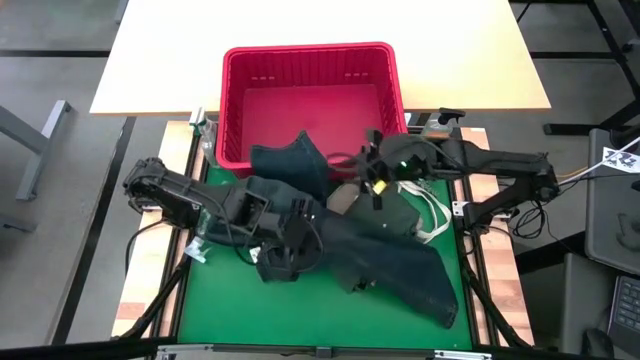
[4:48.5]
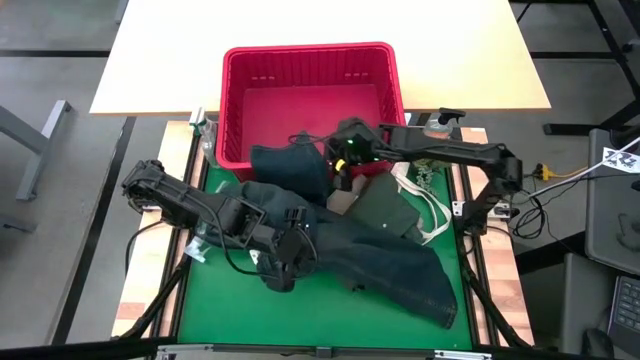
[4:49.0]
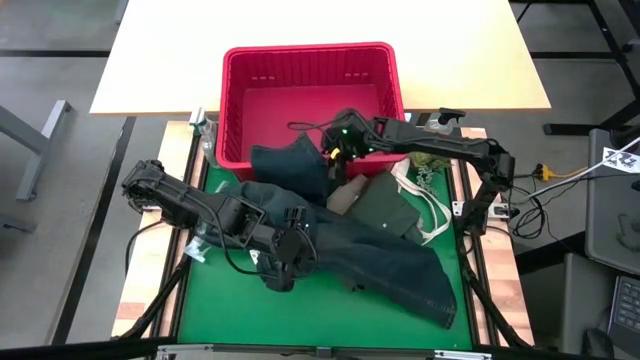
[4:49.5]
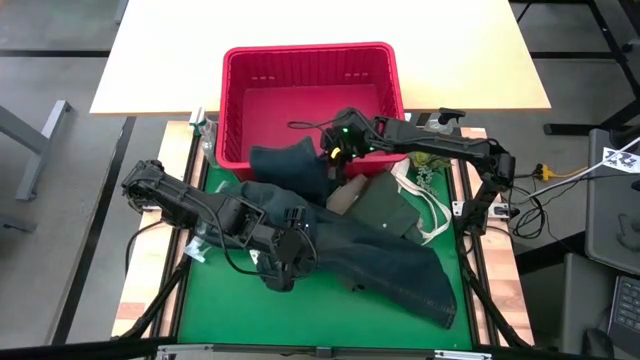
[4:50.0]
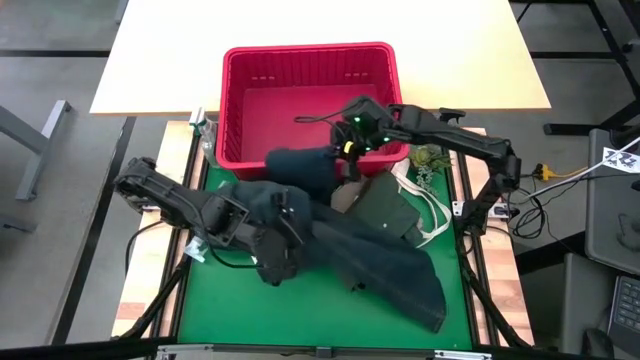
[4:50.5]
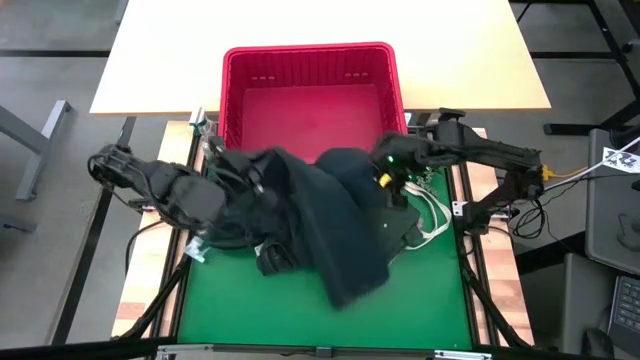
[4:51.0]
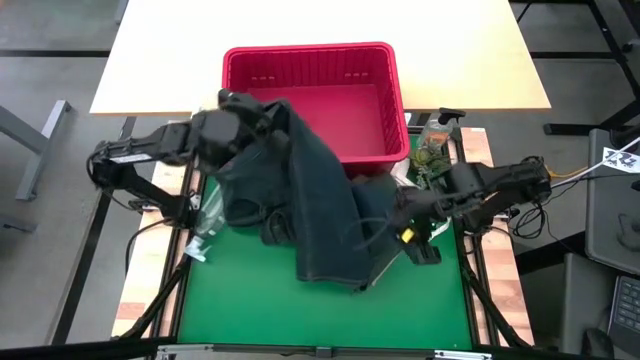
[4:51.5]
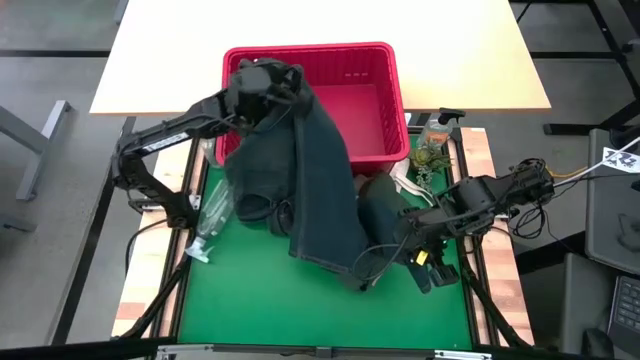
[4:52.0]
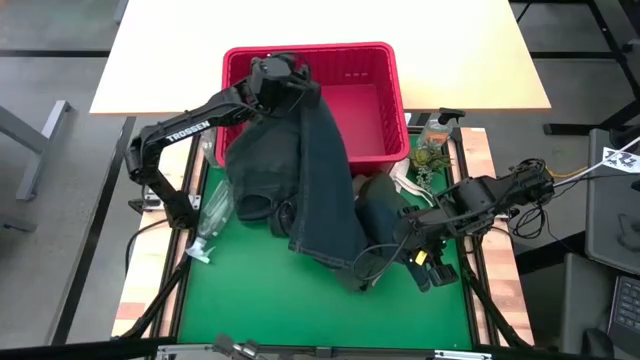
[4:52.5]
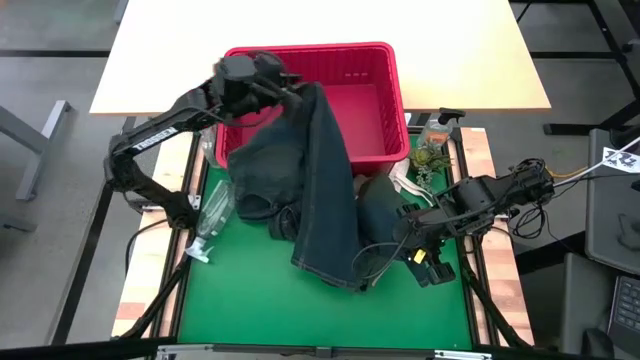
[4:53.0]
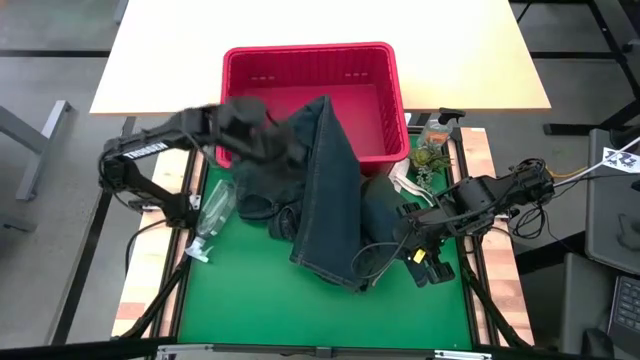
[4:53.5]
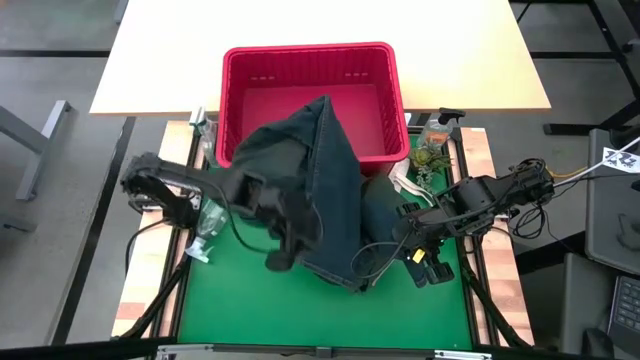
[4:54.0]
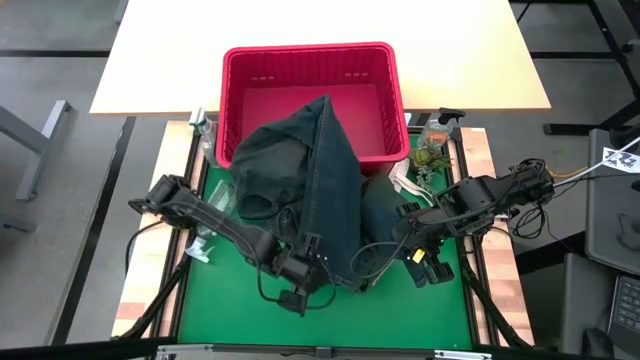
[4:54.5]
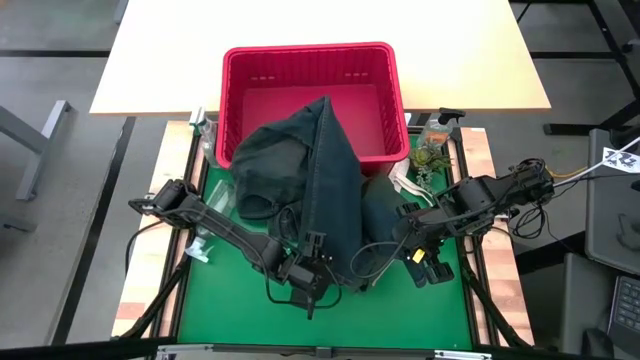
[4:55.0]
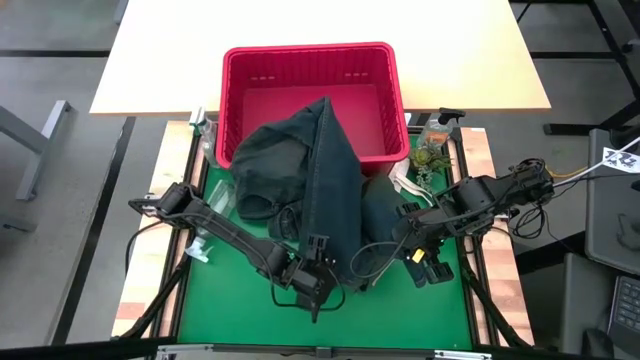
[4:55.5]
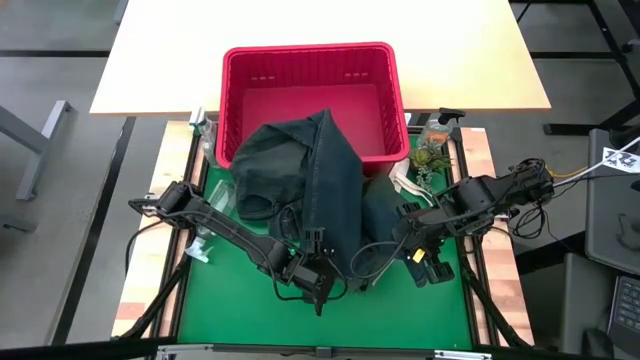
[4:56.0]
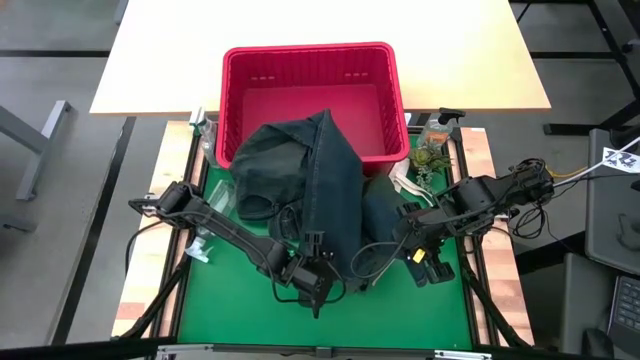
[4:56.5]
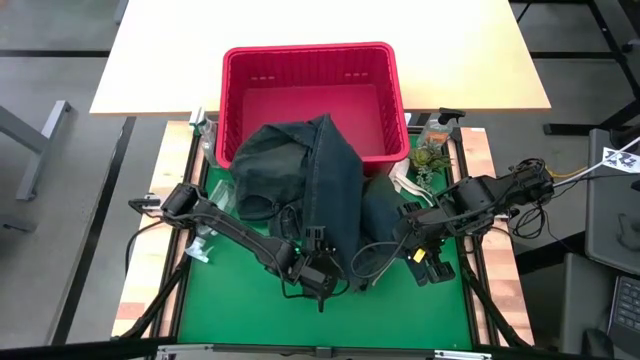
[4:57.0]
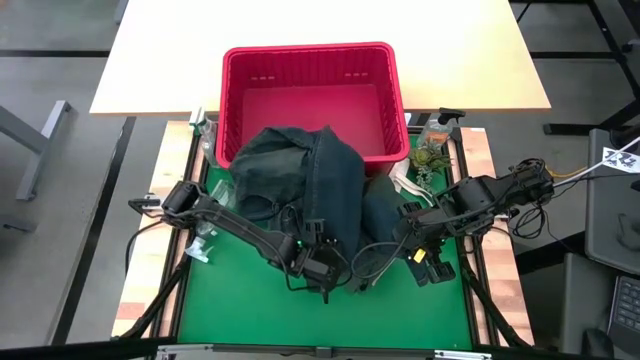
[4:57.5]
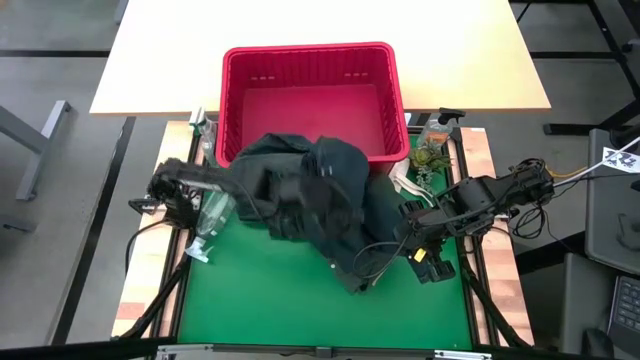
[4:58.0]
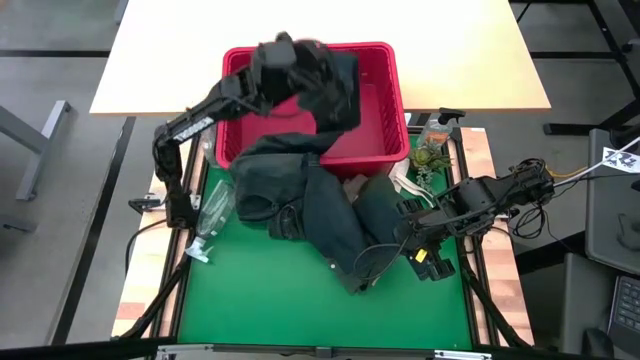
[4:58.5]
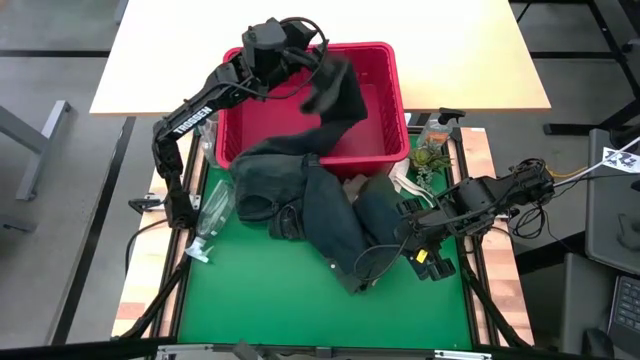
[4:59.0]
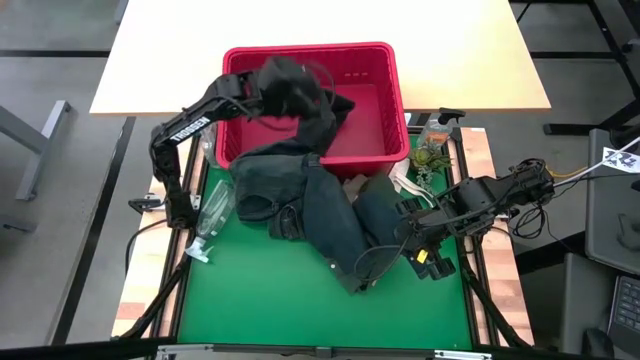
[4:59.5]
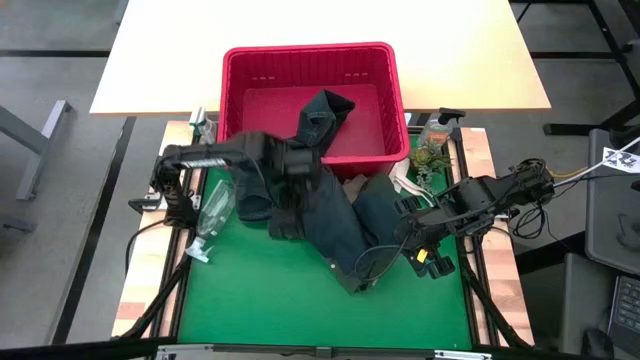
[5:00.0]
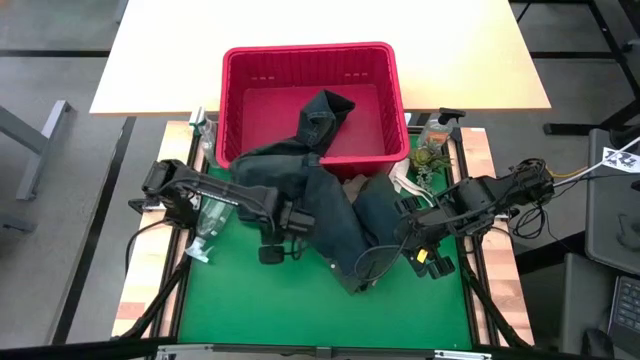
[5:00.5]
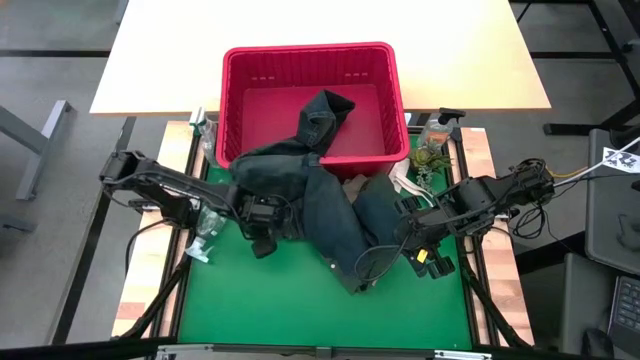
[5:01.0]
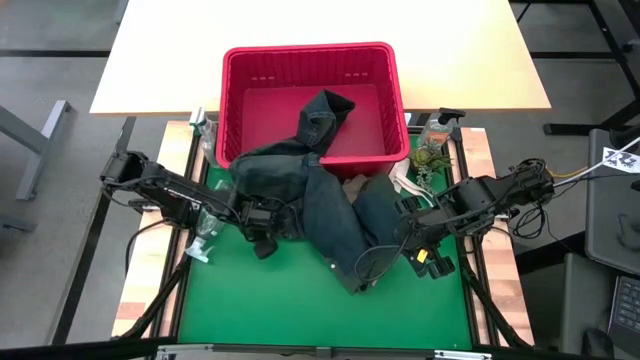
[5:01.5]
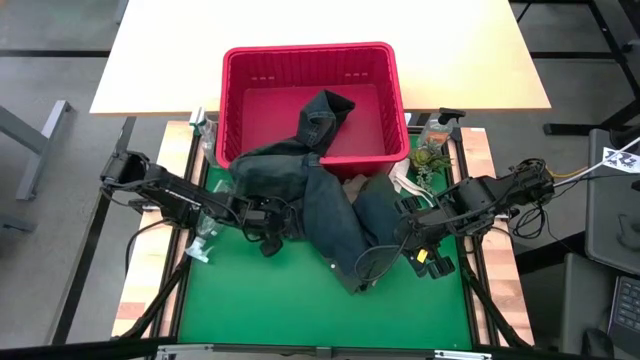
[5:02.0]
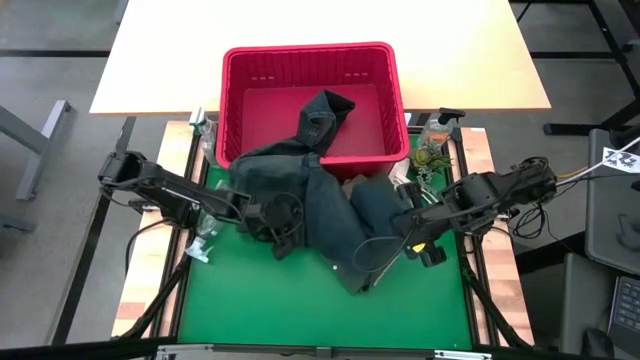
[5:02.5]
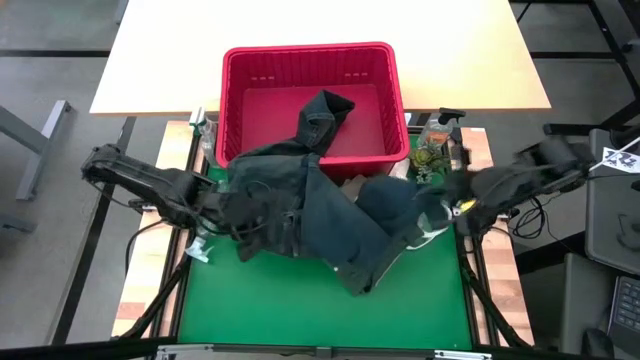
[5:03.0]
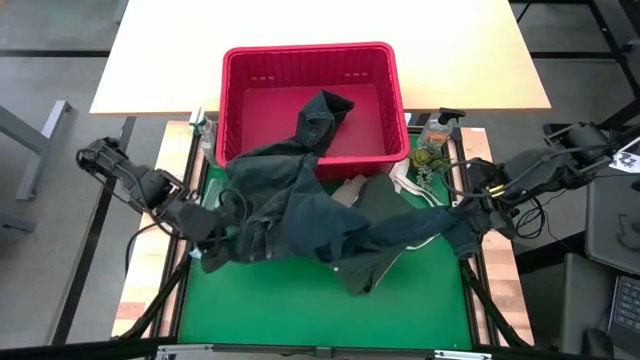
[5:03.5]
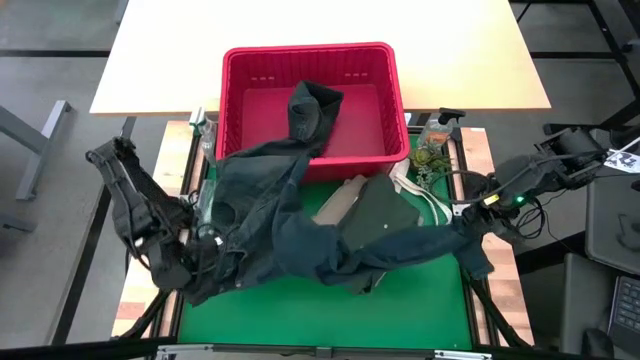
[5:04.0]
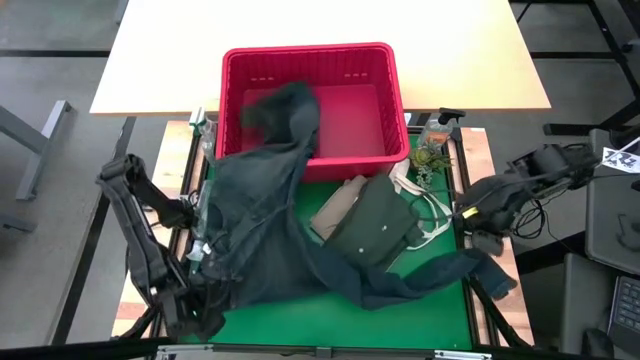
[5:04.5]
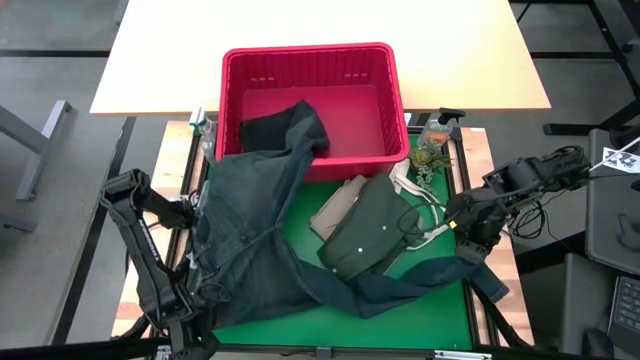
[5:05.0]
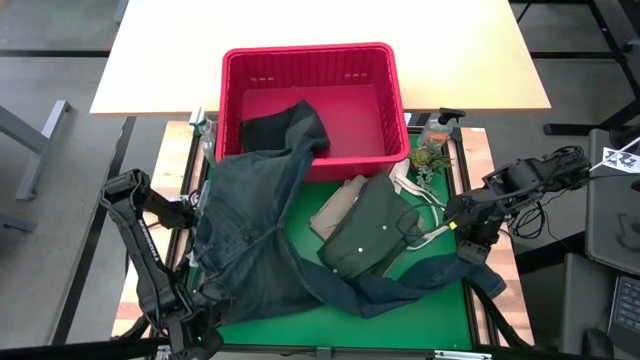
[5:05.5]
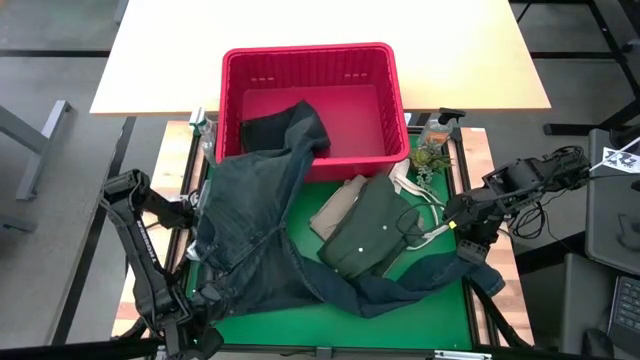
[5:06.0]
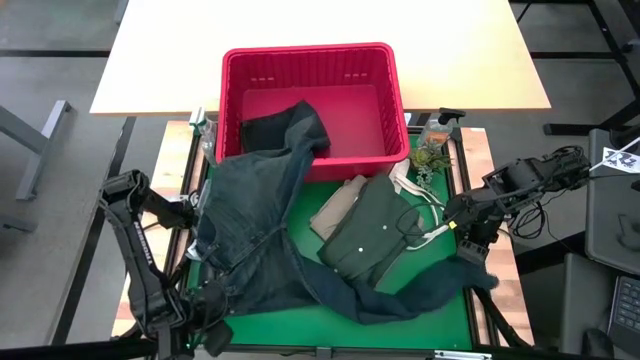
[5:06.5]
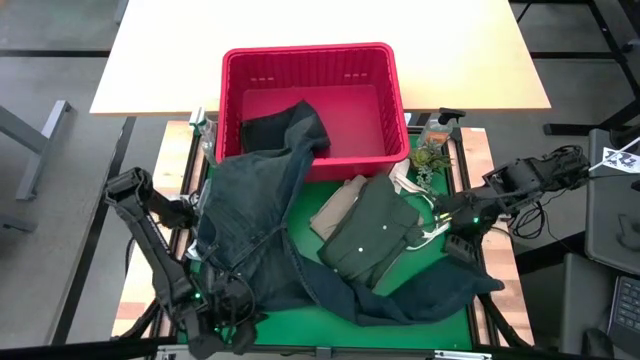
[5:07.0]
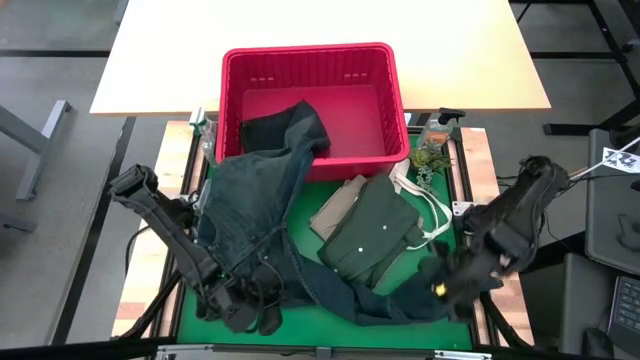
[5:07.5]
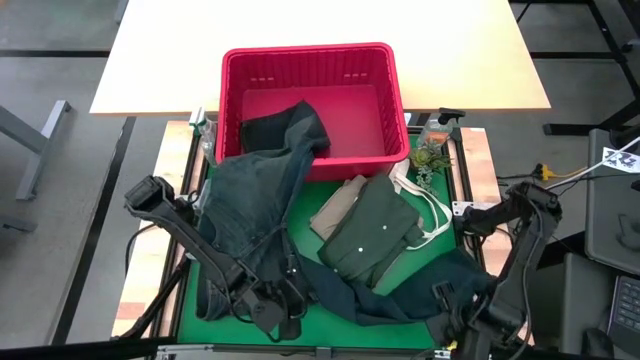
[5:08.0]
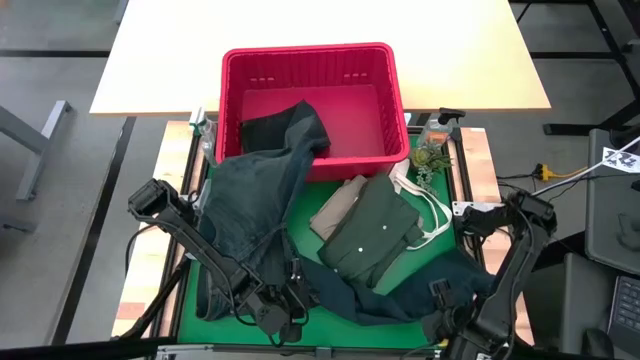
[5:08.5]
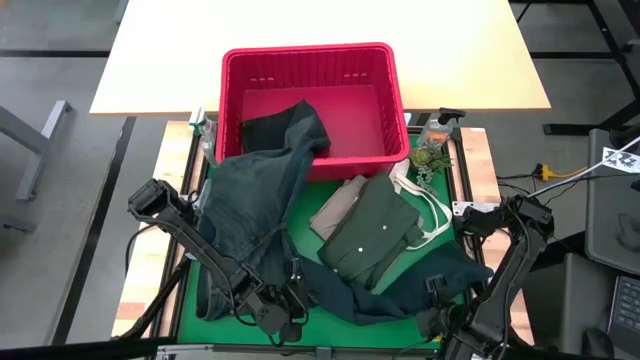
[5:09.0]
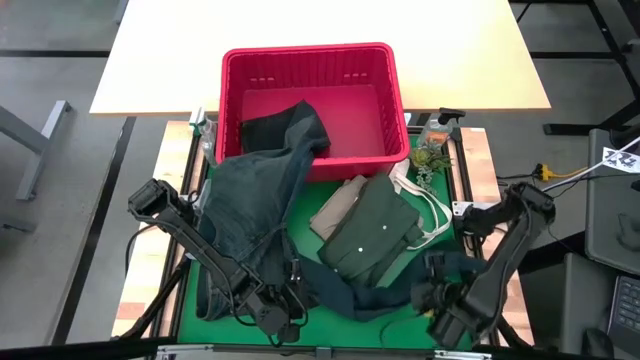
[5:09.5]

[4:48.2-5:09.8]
Task: Fold laundry
Fold the dark blue pants
